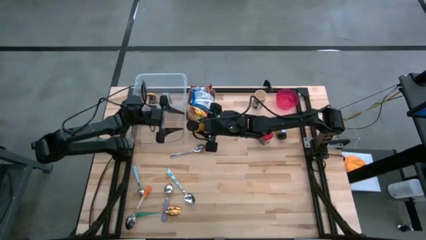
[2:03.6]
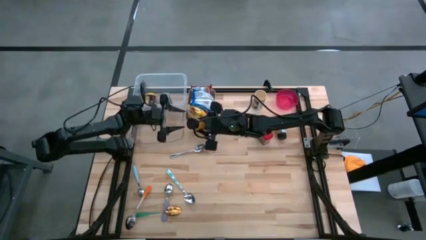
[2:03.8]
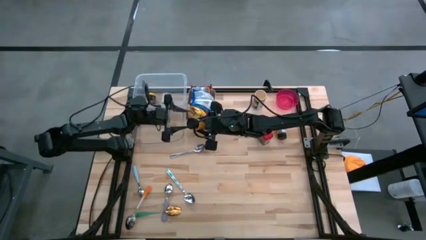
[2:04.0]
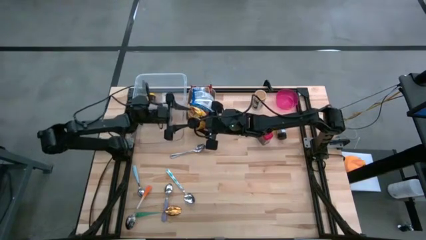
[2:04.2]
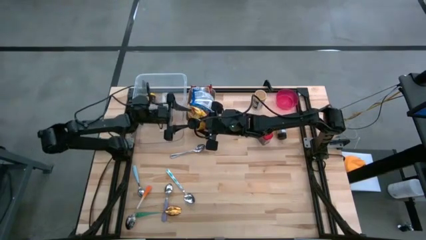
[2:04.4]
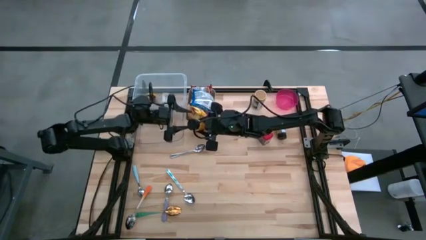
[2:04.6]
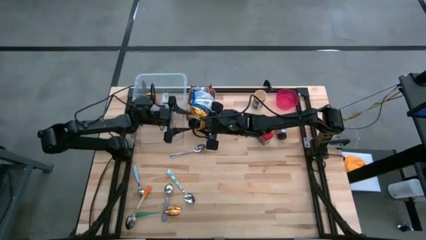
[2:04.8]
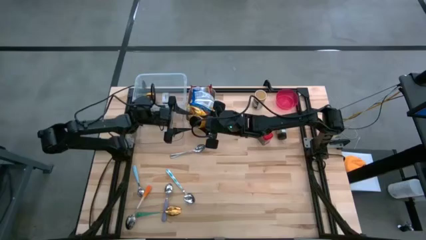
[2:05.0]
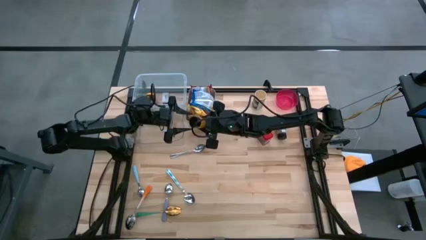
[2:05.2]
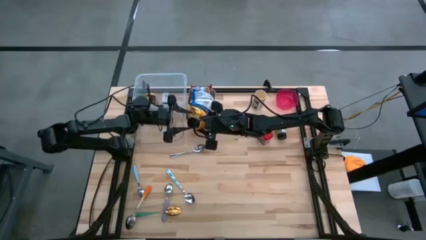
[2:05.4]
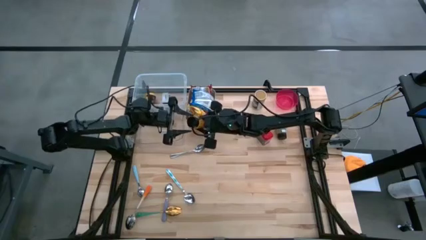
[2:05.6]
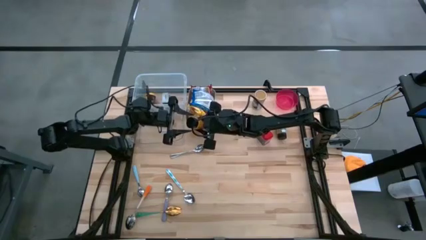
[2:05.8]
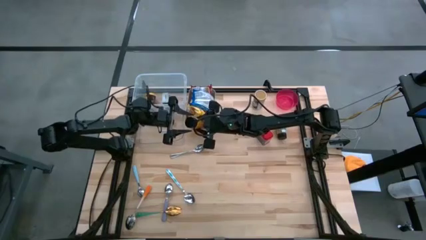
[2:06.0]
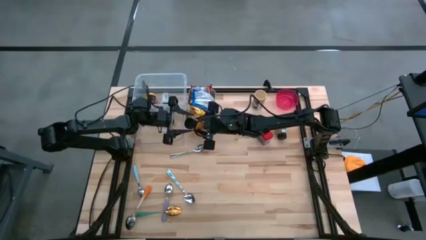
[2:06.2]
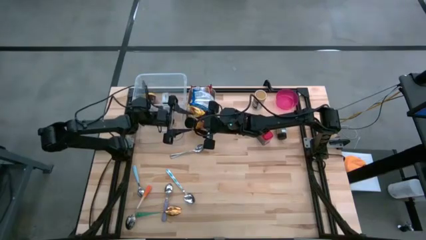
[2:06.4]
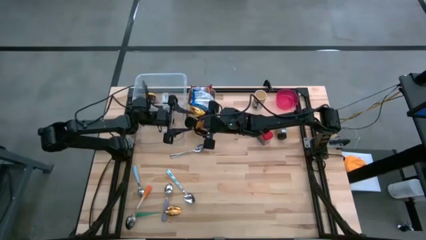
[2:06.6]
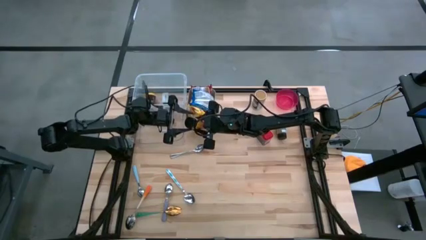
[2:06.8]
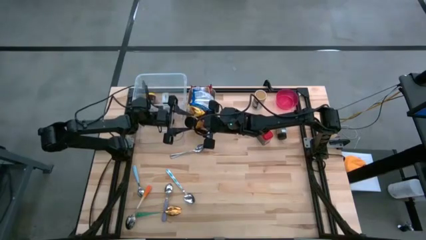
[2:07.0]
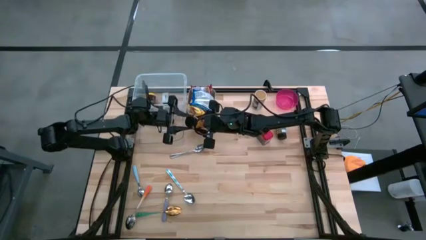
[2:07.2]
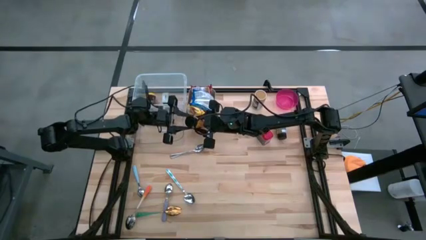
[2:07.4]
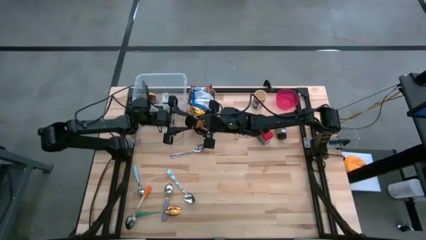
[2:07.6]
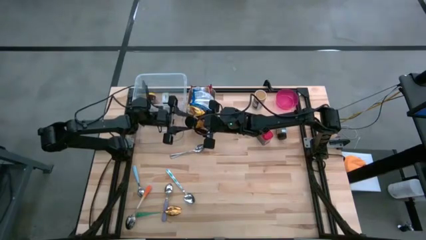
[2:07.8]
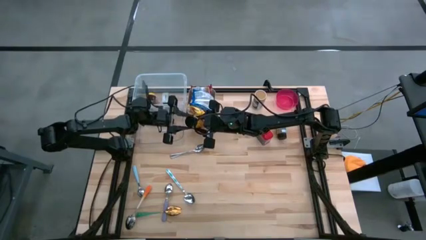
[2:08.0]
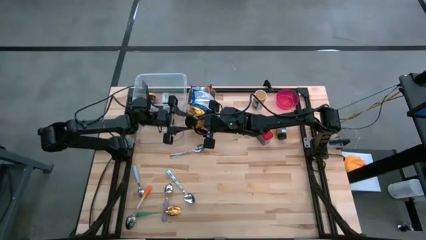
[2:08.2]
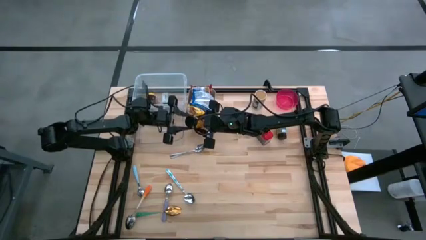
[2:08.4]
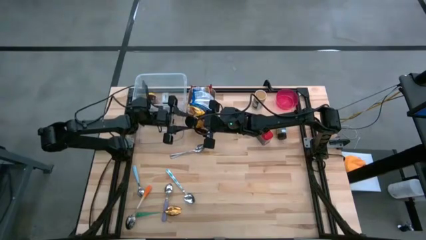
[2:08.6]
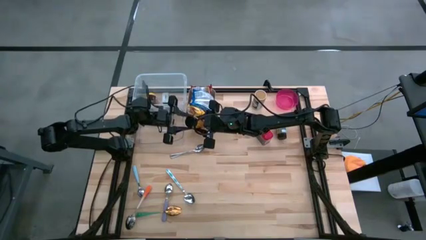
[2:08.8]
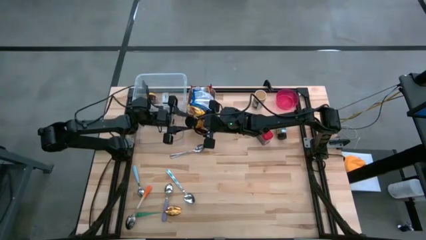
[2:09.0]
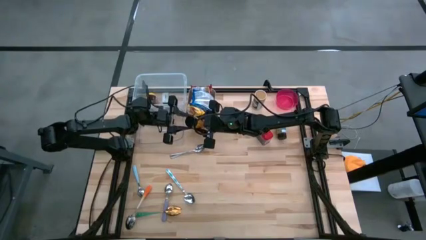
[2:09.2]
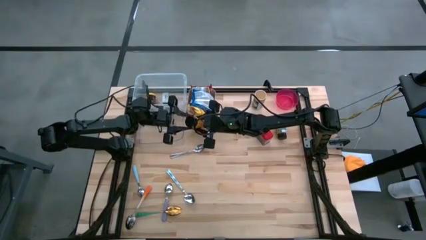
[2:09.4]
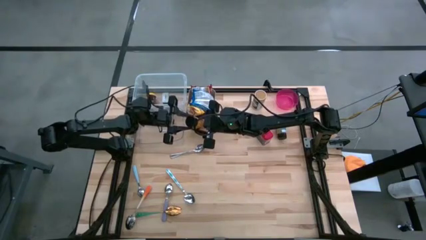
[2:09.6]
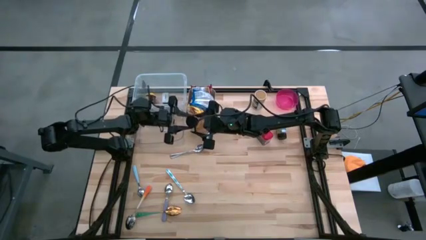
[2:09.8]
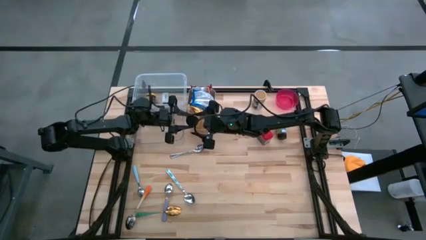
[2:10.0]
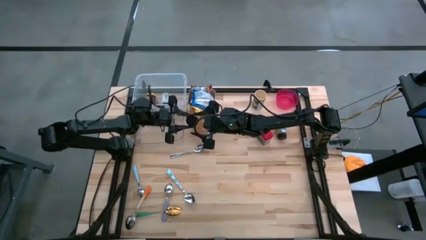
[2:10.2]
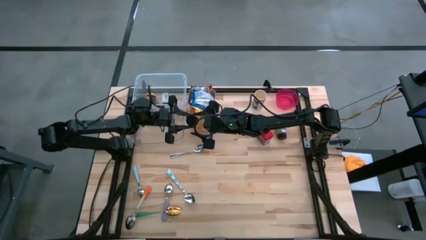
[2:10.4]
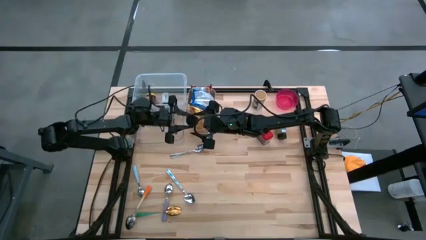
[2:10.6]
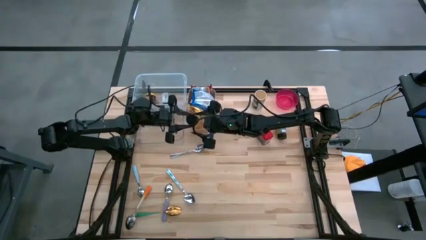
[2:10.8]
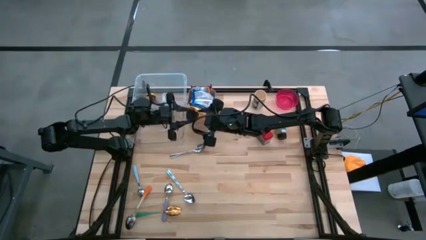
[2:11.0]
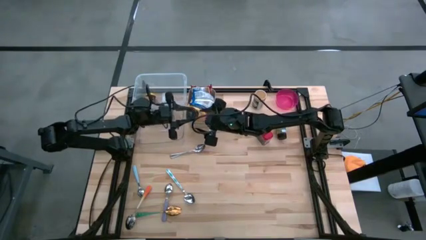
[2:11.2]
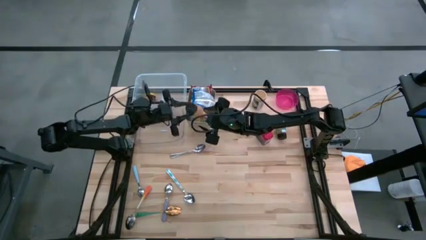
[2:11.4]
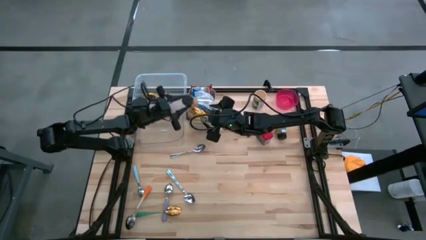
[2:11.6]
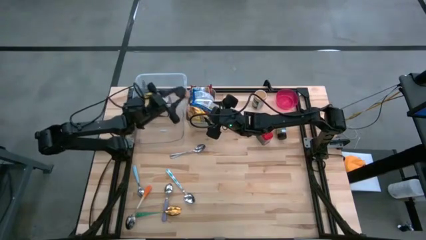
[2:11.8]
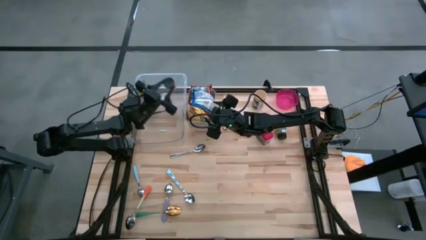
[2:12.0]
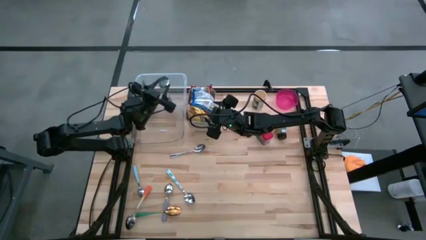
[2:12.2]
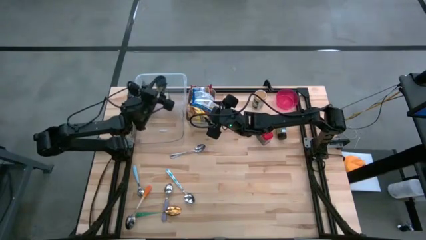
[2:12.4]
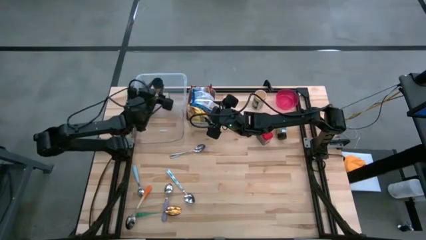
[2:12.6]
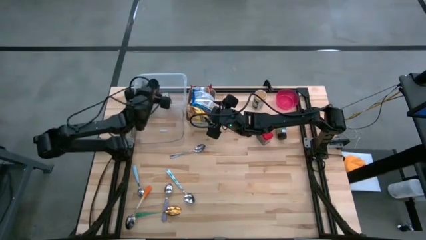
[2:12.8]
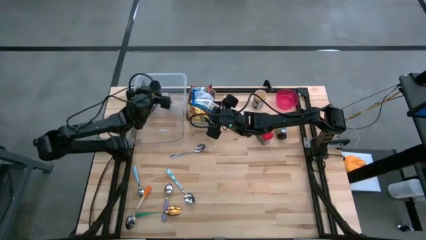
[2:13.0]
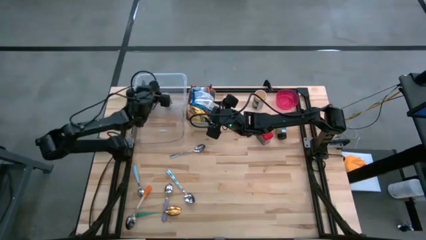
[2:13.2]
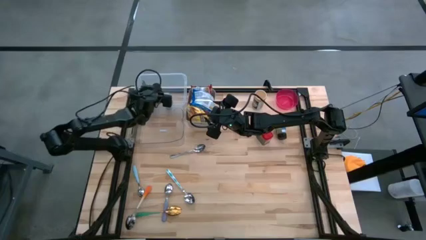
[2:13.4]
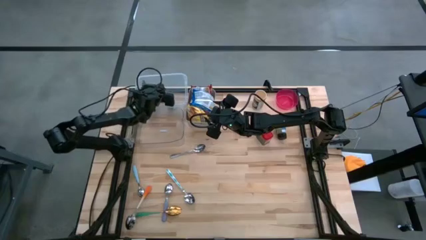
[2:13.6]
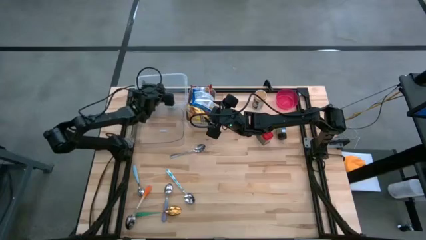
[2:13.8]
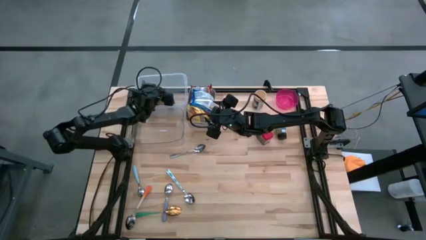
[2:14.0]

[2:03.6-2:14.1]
Put the orange seasoning bottle into the white bin

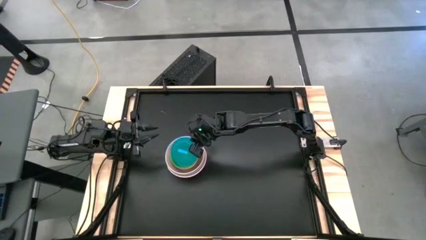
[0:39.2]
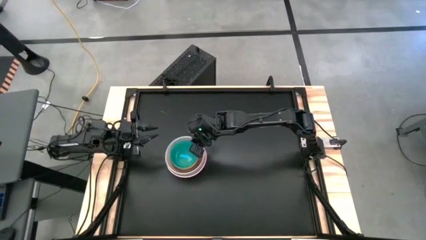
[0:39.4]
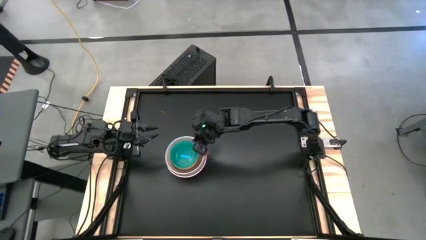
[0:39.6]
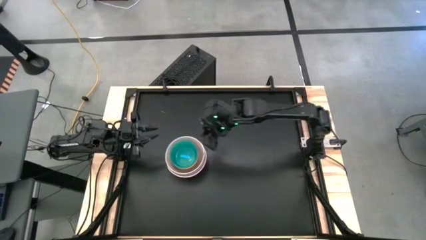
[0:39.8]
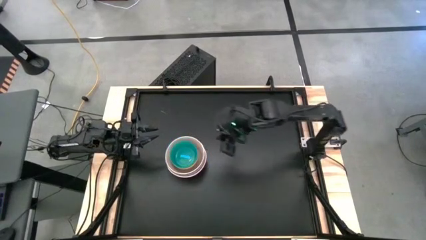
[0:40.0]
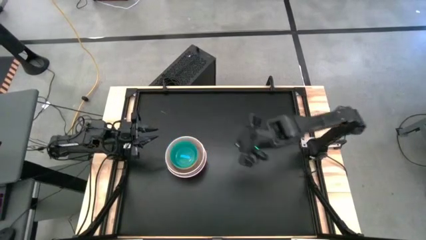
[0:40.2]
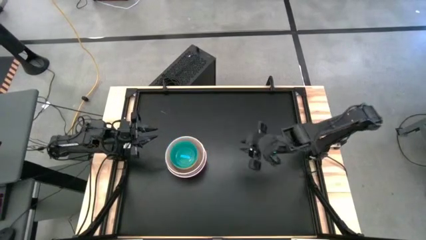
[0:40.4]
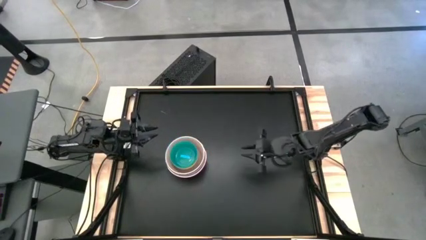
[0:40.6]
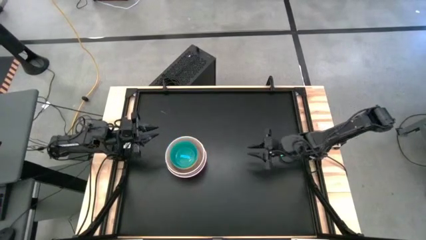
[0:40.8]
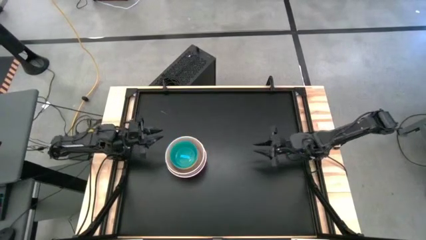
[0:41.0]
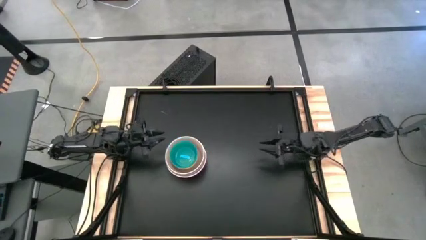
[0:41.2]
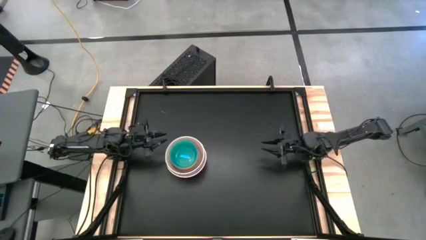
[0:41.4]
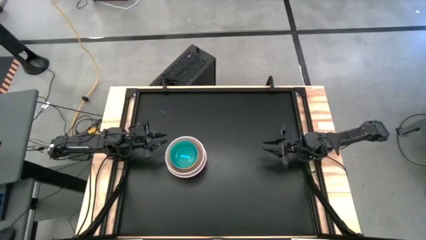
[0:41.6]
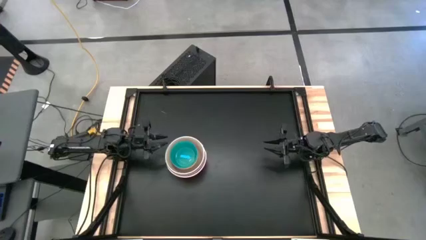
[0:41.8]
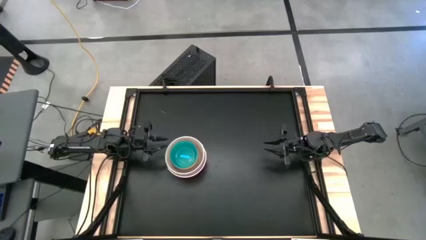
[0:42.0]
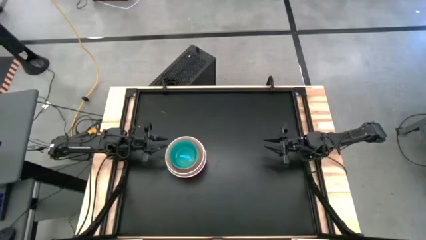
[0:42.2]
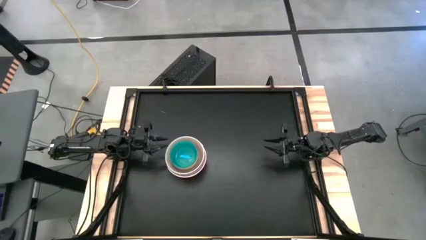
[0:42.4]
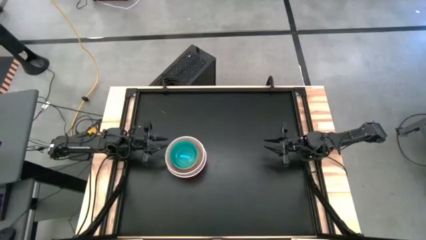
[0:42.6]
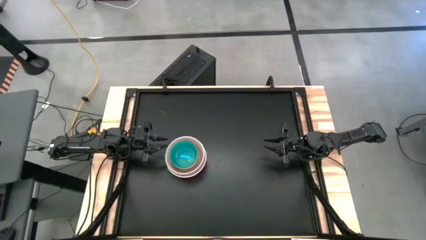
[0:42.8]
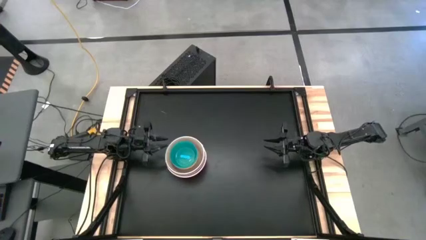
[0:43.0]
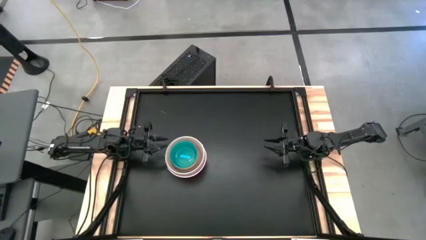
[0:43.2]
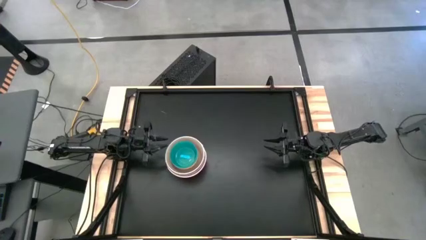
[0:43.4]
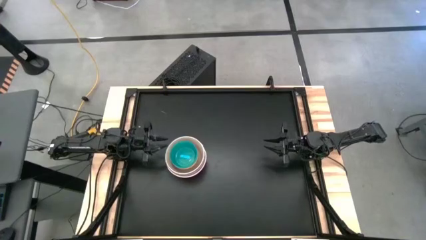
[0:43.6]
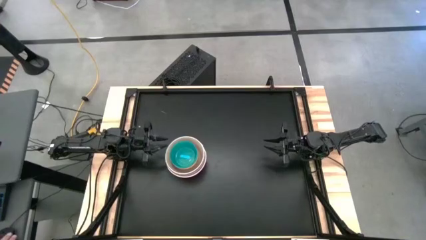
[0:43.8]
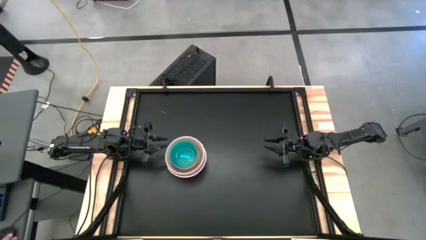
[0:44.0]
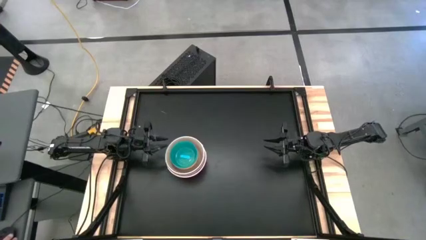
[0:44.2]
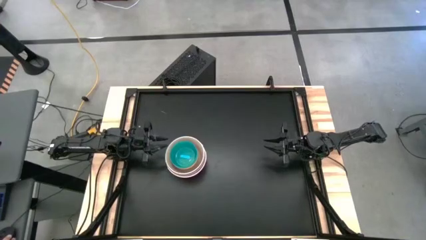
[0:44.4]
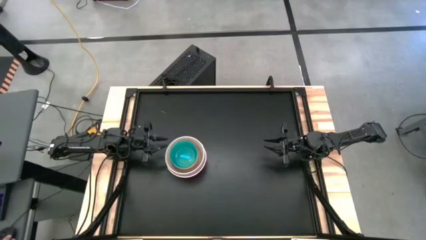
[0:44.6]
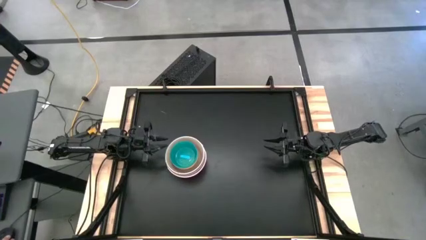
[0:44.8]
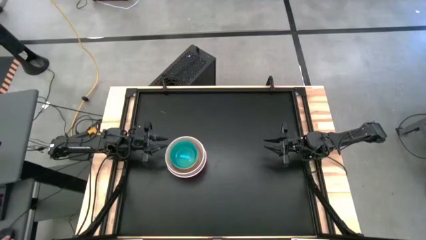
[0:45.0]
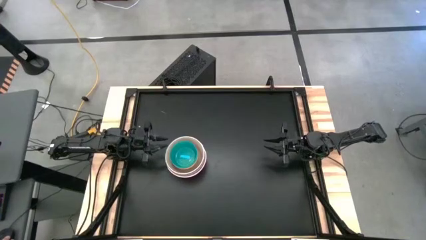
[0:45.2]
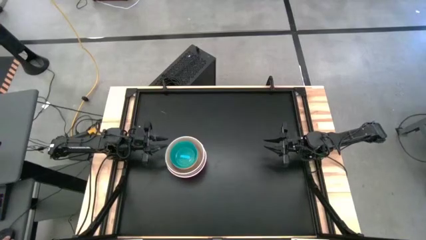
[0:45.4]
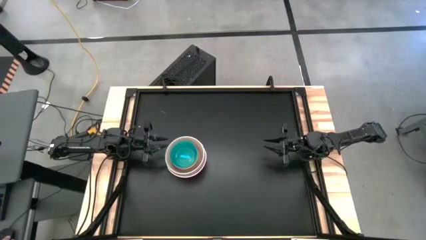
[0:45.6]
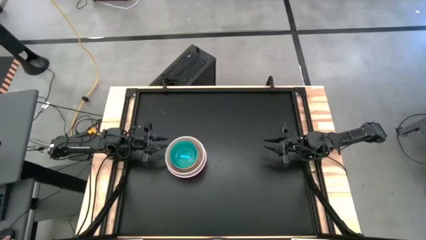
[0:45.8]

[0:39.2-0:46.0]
Return to Home Position
